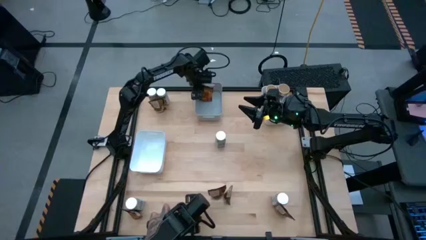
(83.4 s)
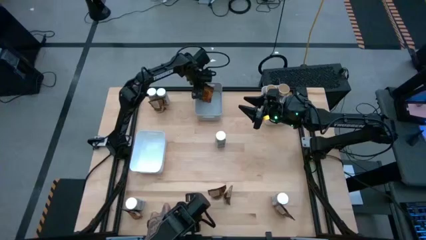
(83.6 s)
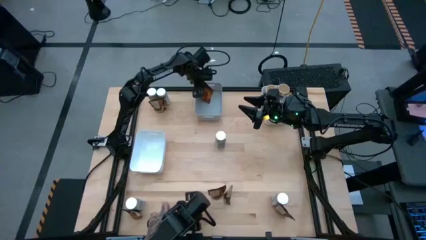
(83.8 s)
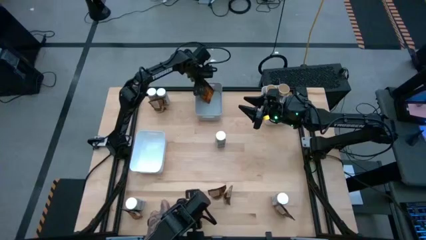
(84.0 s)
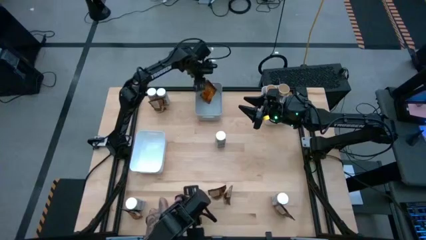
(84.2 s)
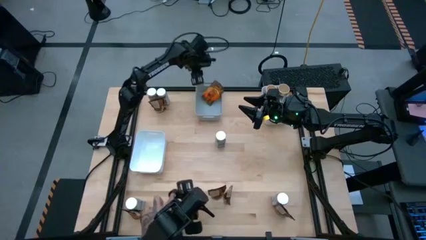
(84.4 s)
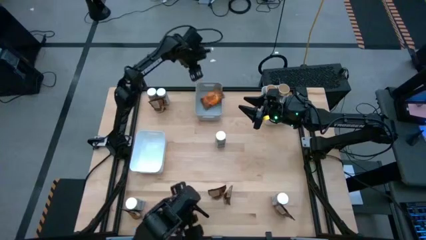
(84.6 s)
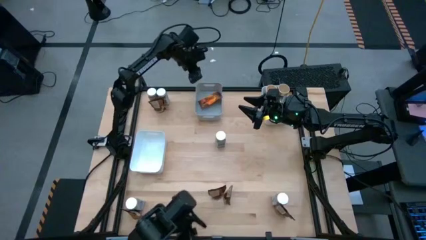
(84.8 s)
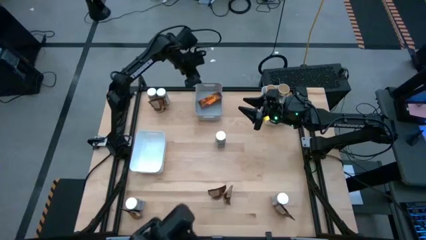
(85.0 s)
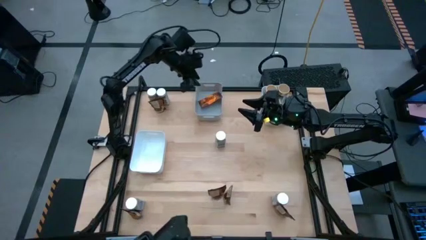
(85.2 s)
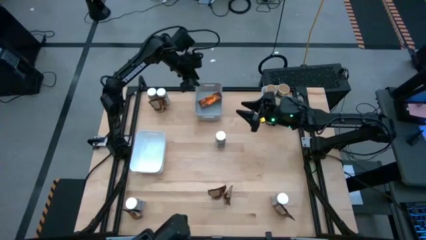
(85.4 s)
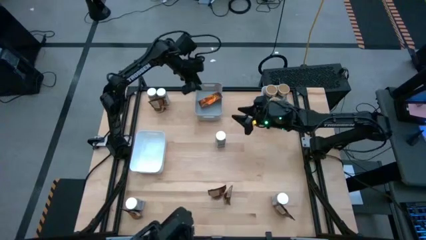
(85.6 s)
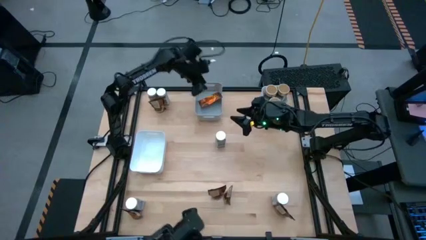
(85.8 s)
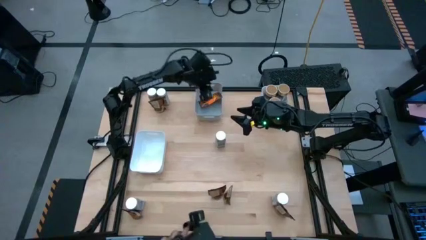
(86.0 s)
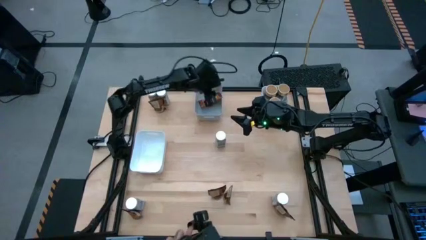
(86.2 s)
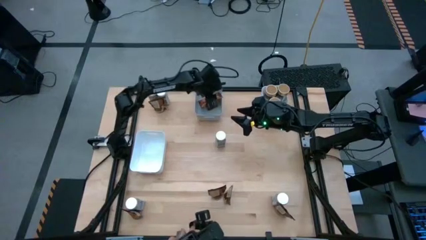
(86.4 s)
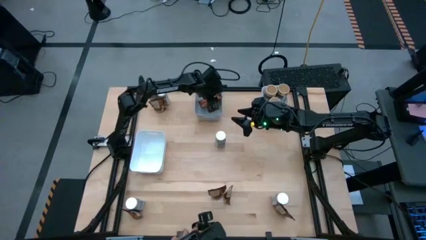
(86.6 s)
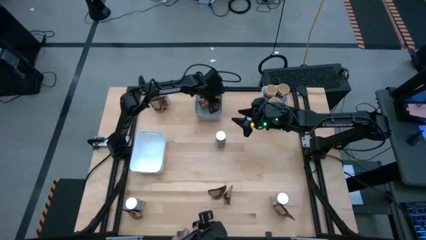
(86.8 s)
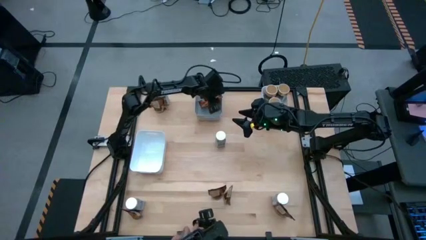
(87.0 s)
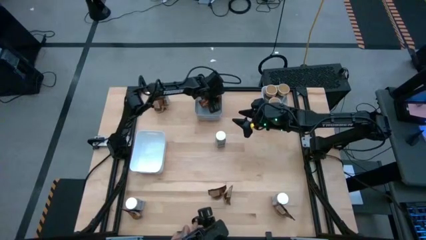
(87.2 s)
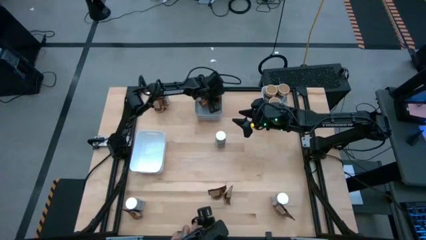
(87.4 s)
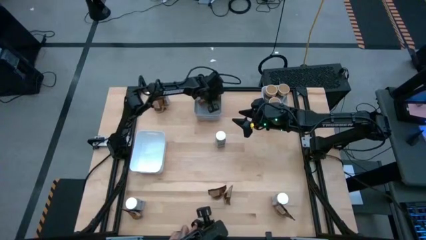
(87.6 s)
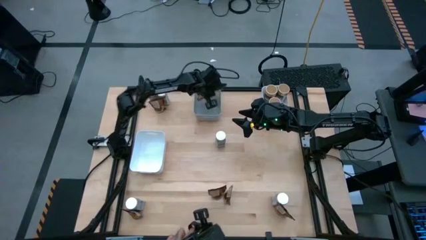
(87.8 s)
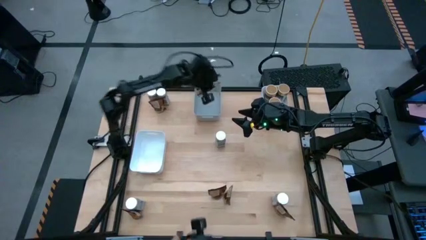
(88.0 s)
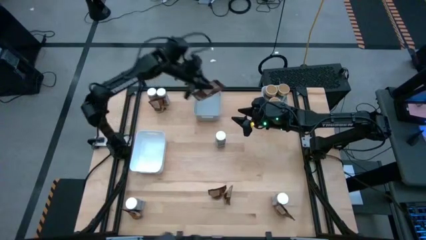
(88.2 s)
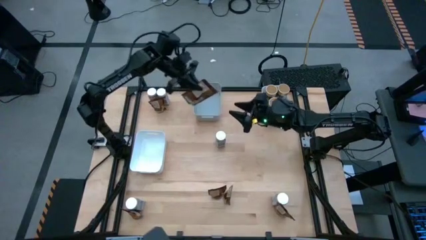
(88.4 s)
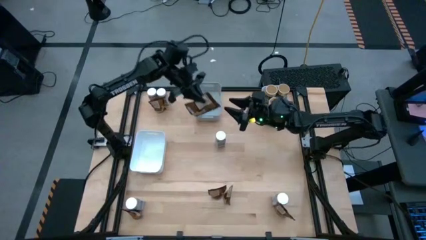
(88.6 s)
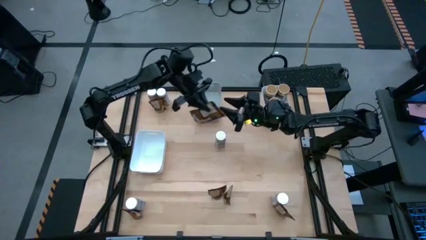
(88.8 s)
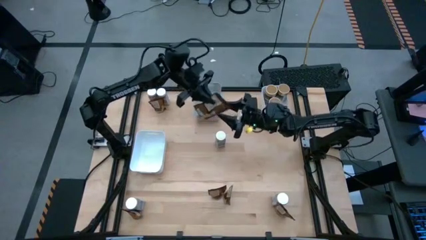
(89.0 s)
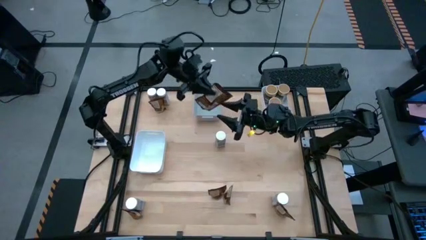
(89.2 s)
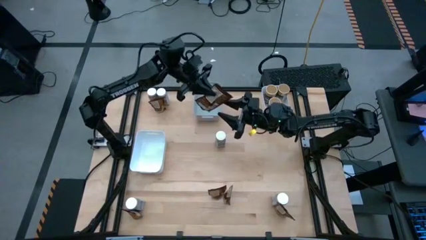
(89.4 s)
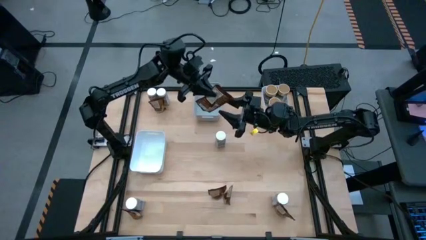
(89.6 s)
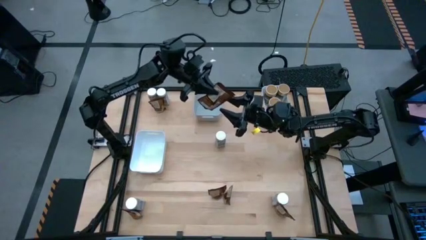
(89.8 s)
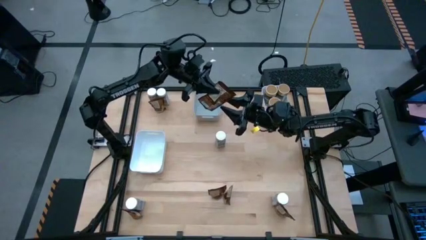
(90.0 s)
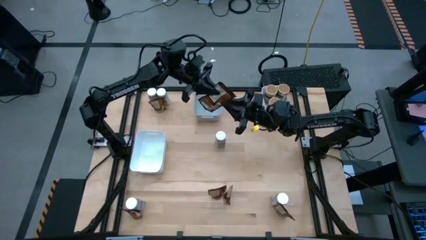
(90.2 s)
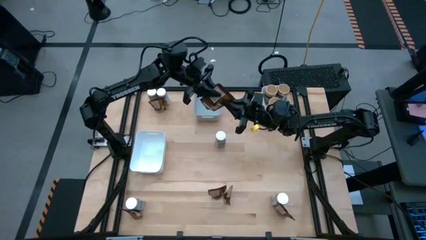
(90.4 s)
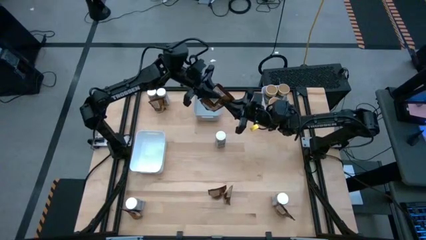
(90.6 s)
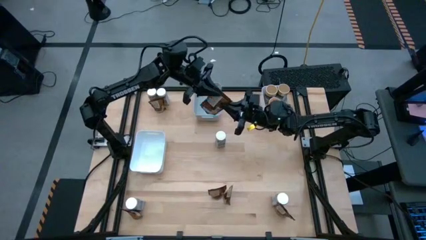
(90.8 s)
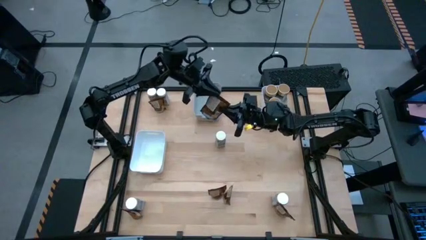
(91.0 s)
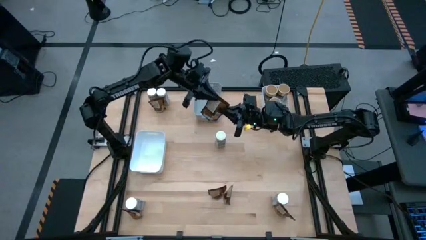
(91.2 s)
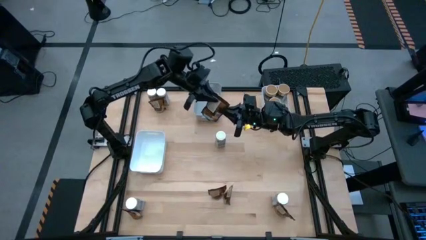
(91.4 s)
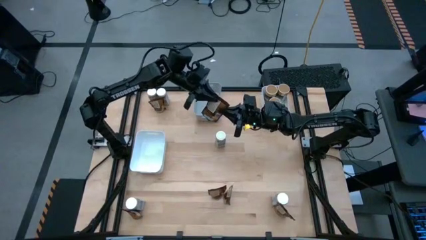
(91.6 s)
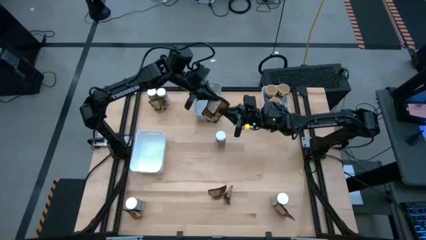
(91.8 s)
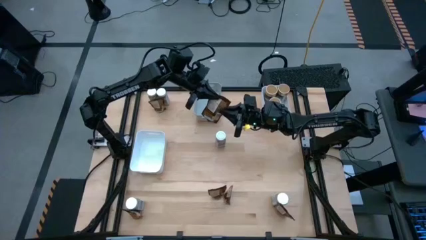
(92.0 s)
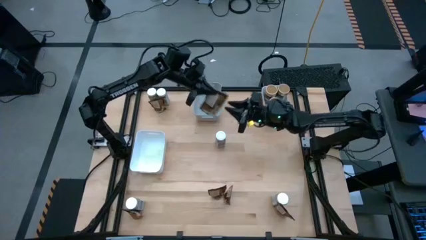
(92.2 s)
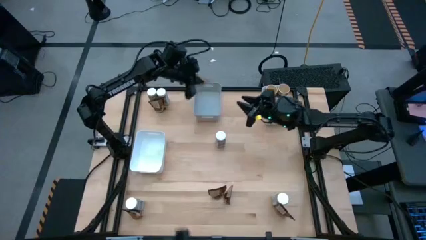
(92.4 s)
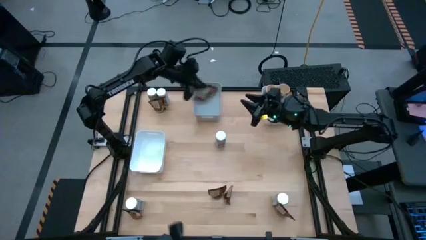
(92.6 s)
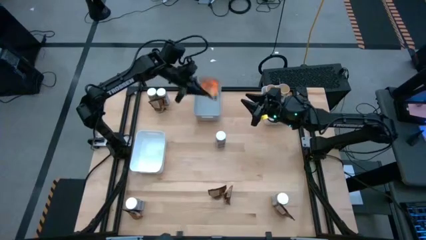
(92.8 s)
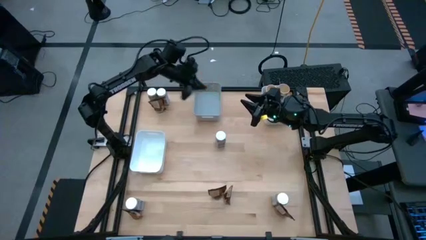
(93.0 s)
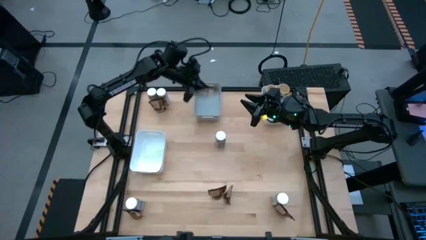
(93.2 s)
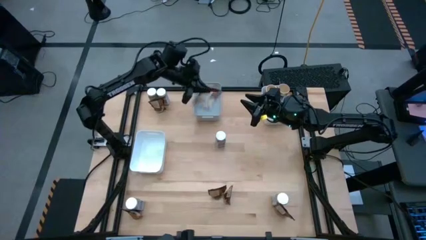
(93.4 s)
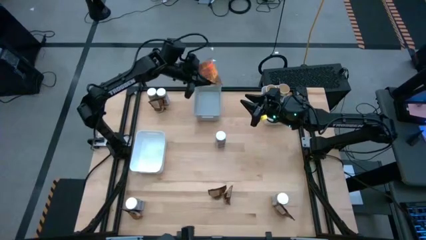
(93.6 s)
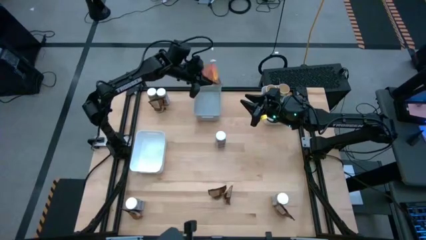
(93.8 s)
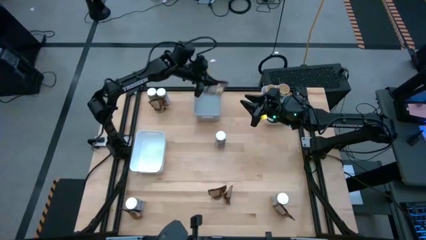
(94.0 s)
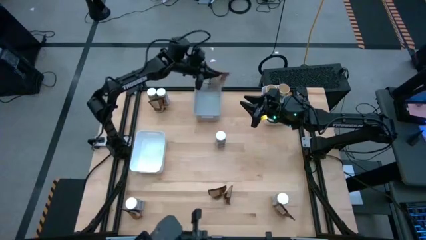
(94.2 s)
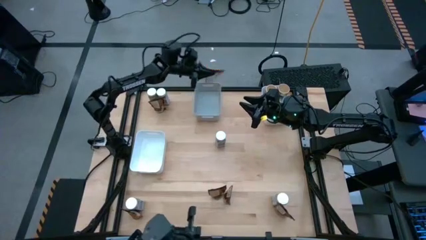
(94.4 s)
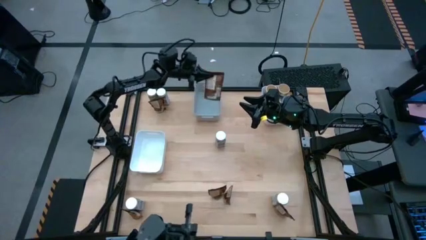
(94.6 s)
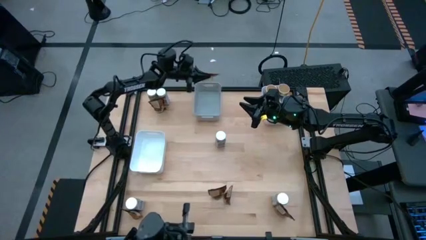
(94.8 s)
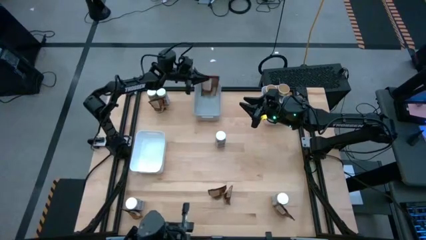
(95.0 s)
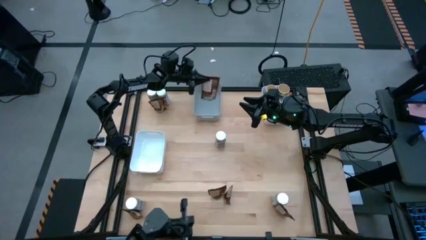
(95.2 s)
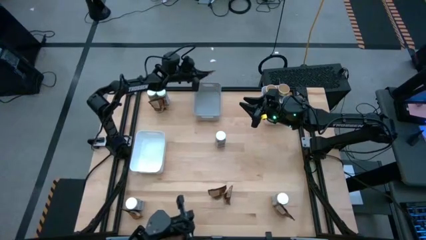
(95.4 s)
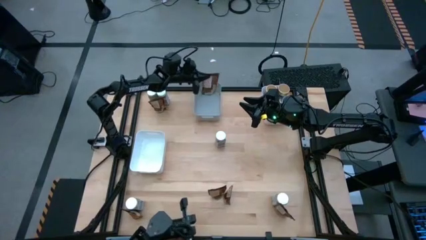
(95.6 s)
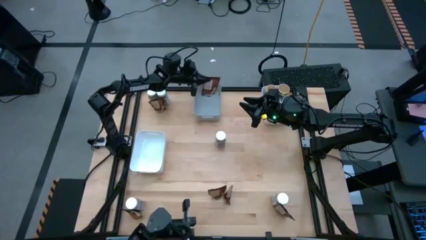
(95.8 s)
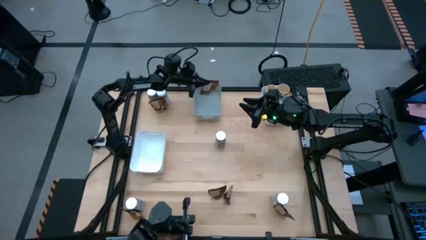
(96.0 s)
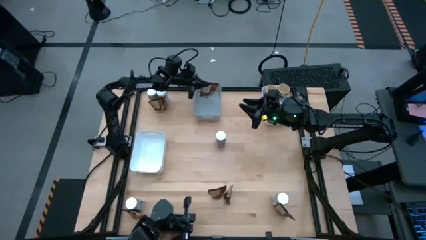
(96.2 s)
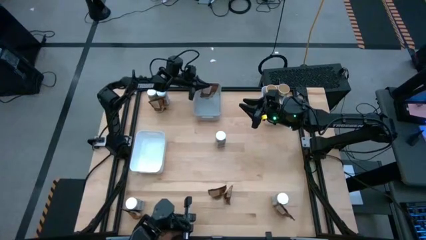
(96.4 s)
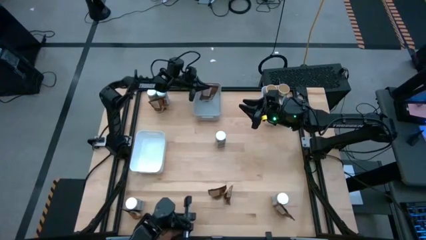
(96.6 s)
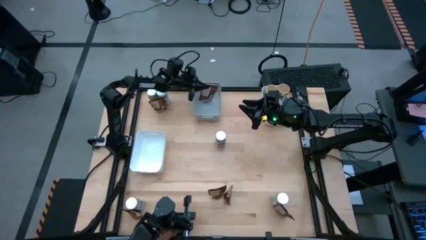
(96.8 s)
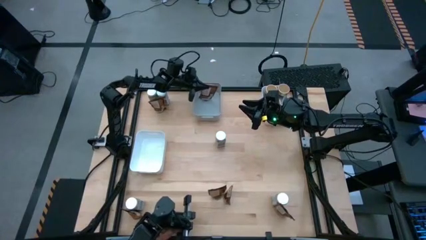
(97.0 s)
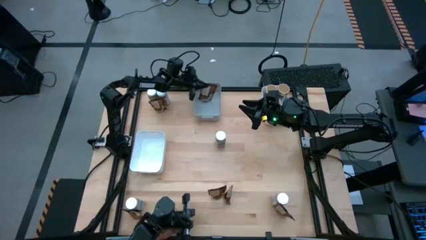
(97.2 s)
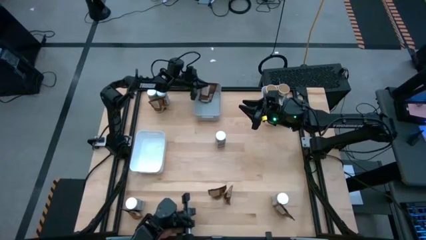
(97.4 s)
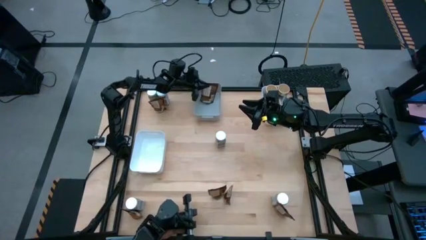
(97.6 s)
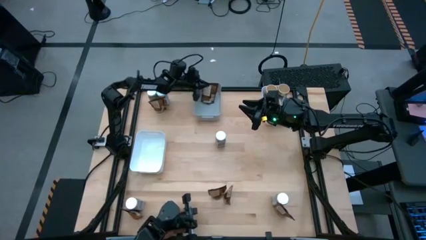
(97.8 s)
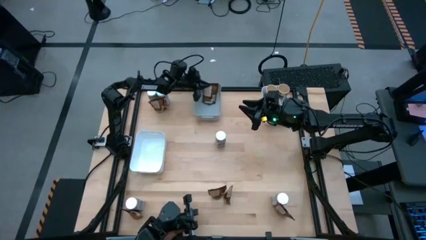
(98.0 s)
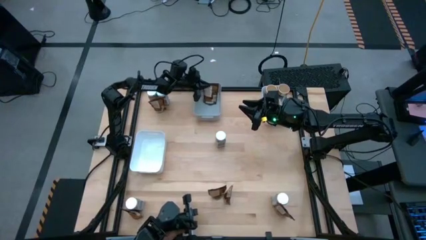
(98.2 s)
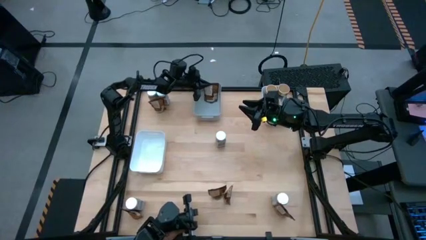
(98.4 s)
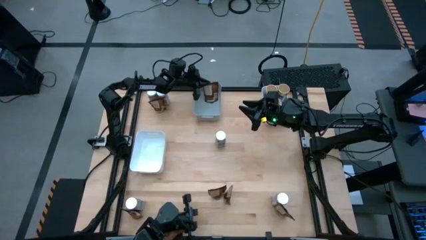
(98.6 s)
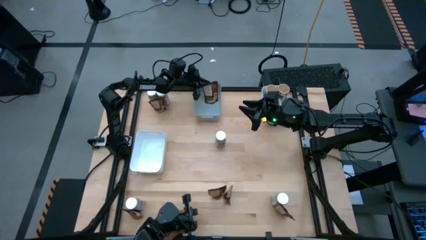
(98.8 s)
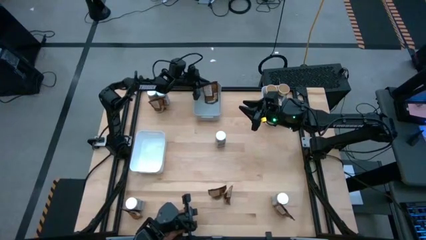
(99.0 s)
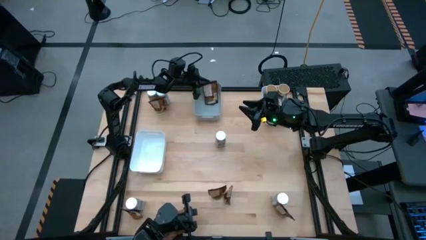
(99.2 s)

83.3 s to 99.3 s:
Task: Sort spices by type
Put the orange spice pack into the gray bin
